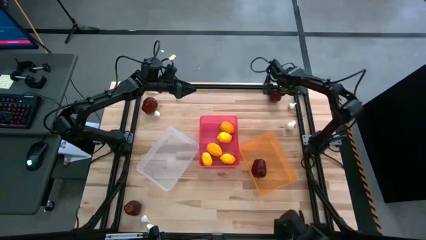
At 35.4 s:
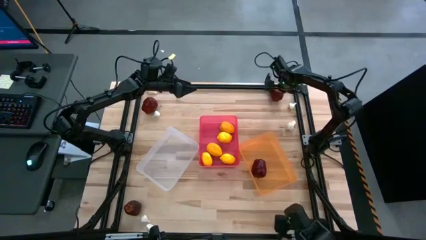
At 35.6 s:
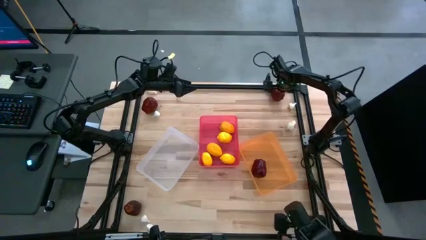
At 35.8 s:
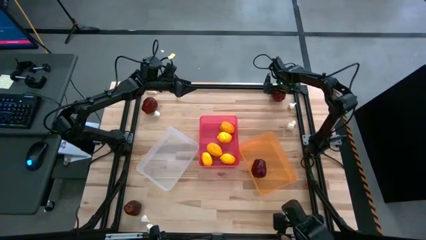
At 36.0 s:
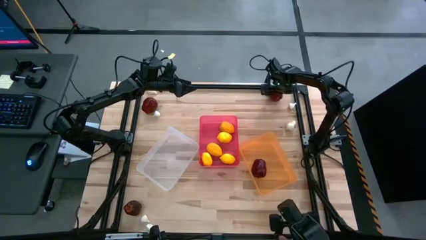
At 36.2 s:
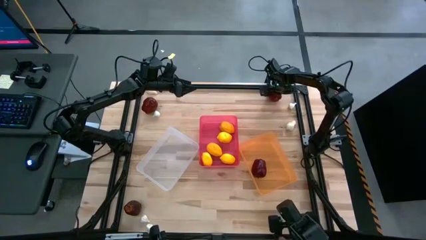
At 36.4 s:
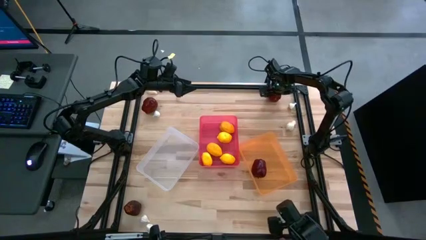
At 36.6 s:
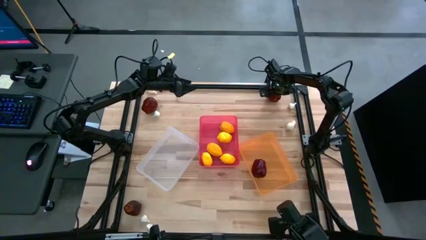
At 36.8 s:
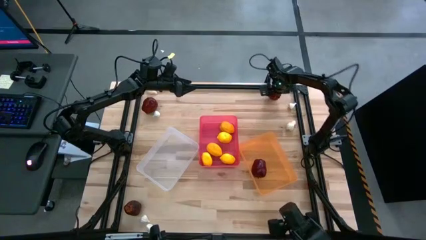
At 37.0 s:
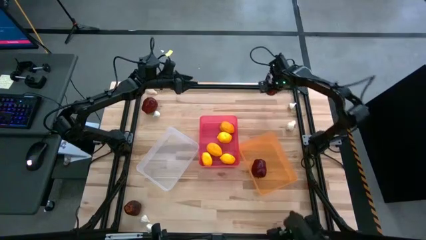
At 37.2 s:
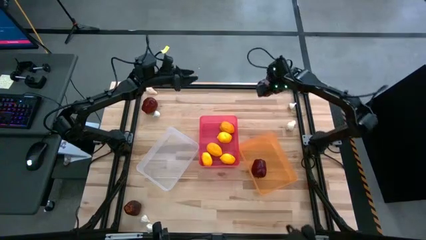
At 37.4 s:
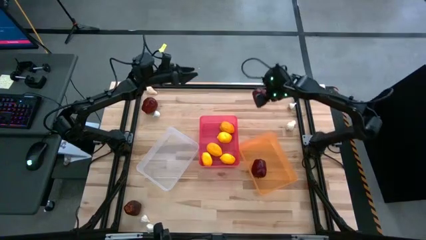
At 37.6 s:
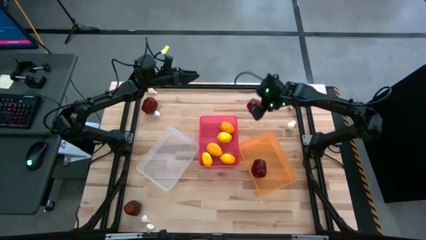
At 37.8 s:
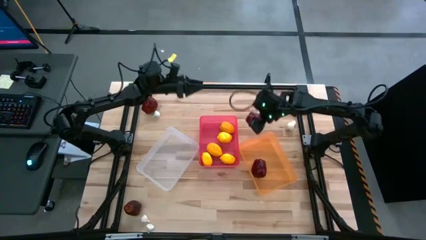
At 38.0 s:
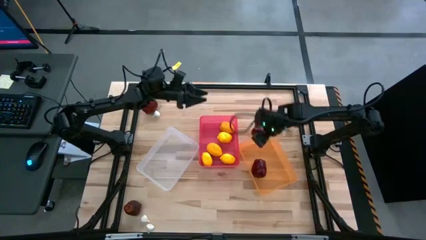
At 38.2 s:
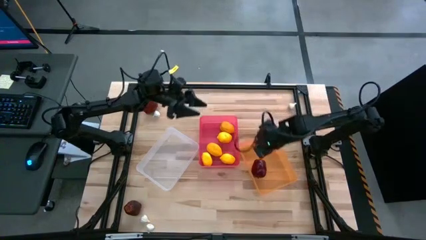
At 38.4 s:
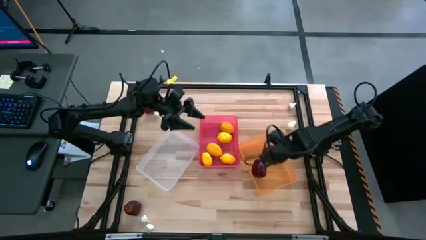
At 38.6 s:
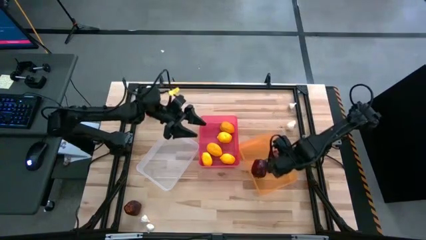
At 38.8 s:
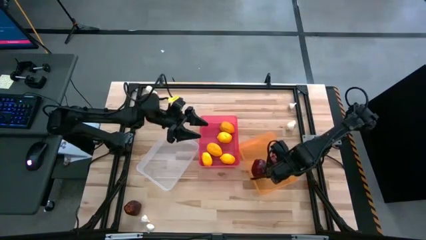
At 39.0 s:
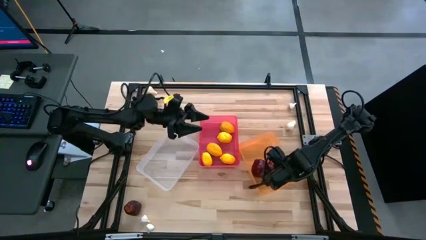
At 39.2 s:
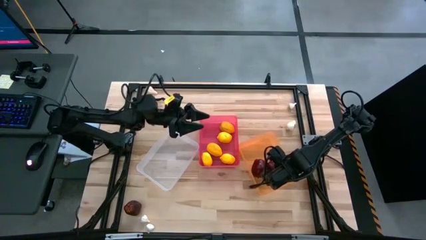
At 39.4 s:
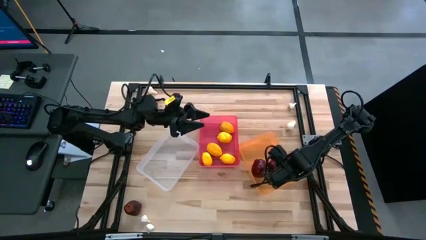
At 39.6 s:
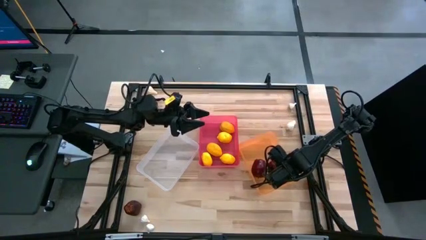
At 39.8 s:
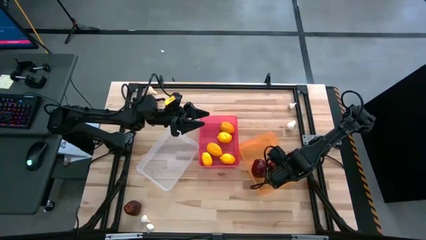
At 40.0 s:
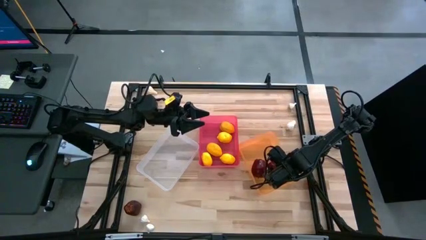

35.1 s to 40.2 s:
Task: Sort produce into baskets
Put the red apple into the orange bin

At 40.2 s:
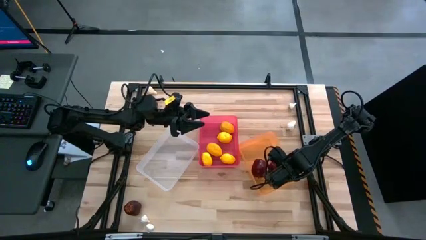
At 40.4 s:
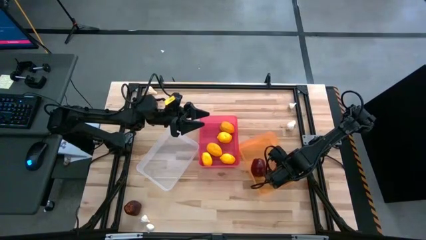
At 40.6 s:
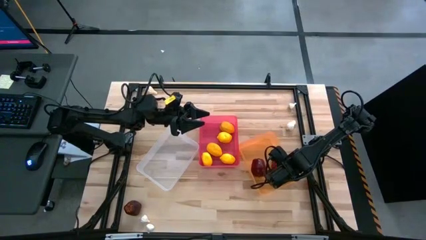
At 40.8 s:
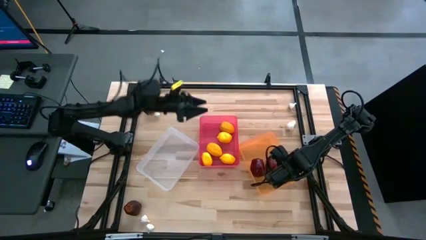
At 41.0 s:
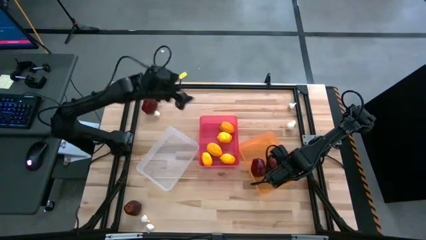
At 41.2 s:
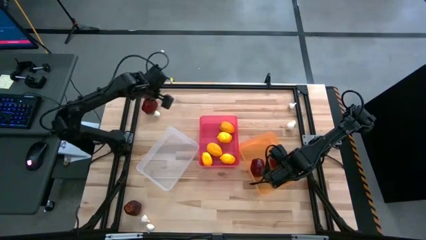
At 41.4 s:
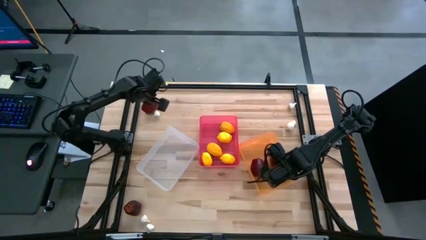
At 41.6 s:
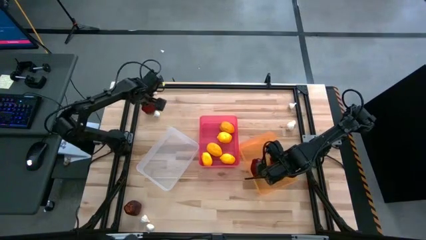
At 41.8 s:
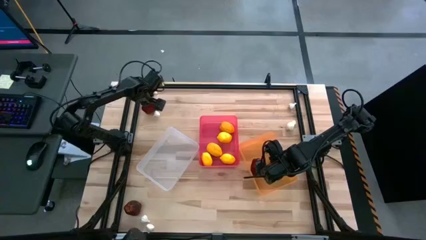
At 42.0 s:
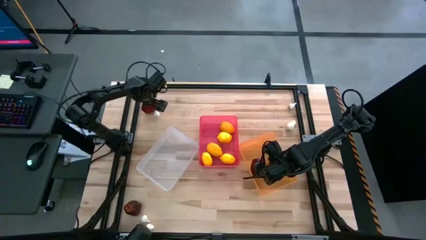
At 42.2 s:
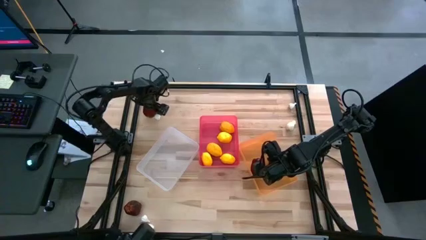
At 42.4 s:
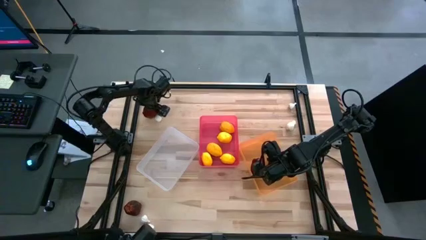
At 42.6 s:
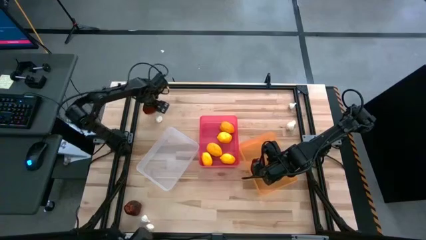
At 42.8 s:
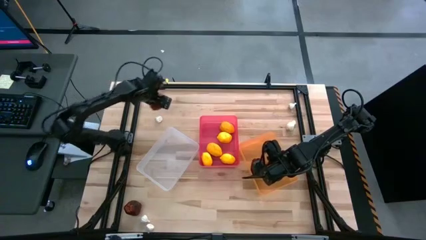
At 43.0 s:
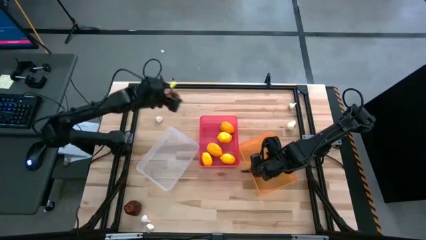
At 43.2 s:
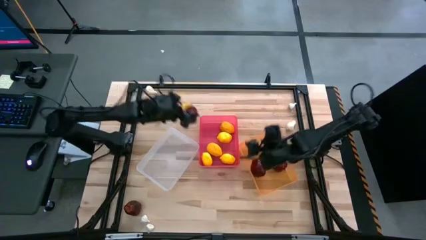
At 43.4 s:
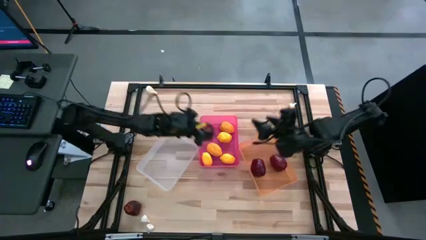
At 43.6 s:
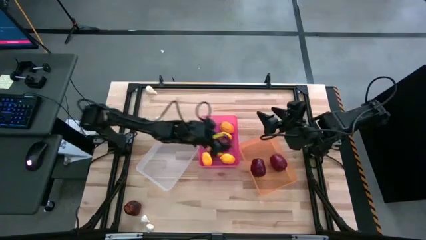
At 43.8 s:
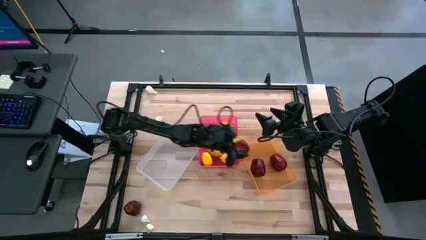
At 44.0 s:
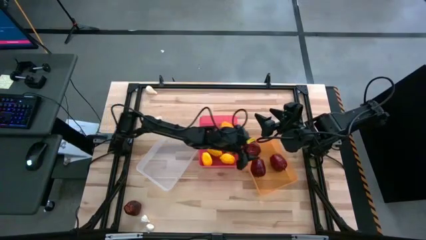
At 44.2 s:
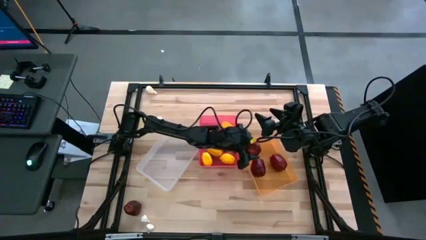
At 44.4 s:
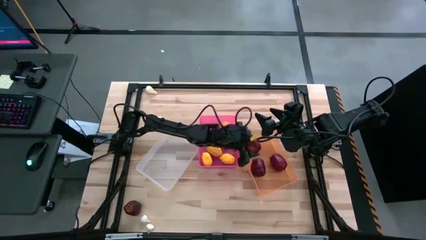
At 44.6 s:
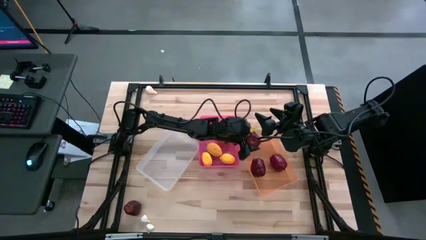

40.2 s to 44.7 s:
Put the red apple into the orange bin

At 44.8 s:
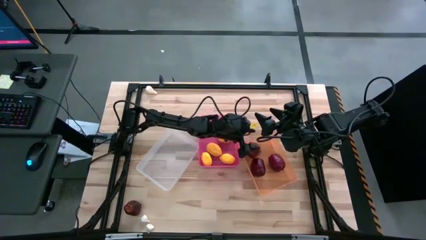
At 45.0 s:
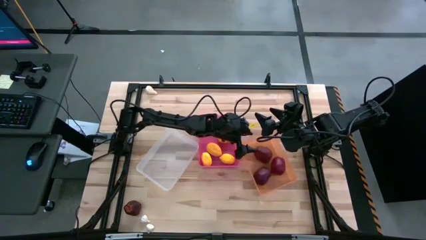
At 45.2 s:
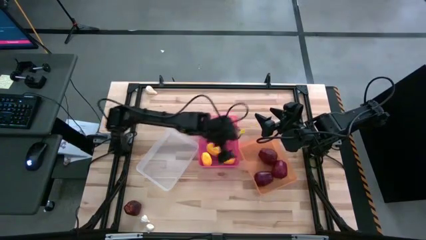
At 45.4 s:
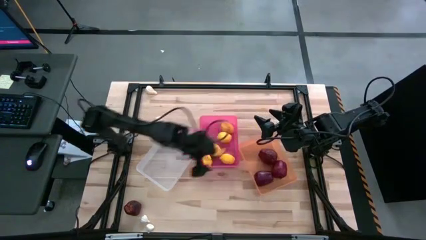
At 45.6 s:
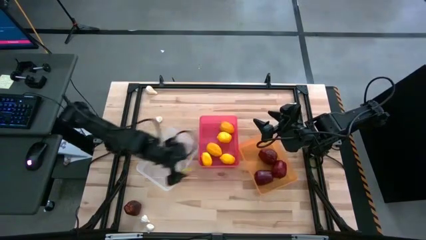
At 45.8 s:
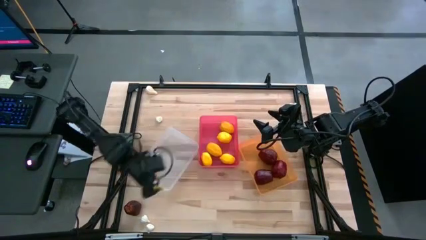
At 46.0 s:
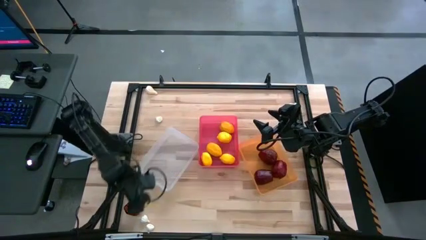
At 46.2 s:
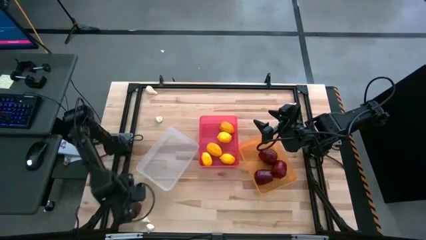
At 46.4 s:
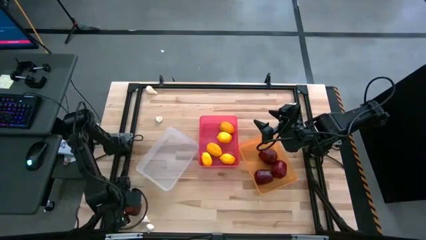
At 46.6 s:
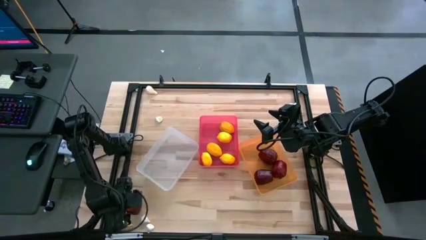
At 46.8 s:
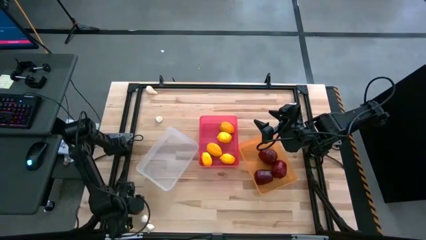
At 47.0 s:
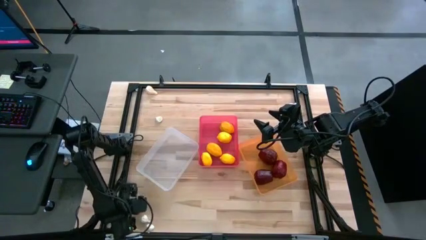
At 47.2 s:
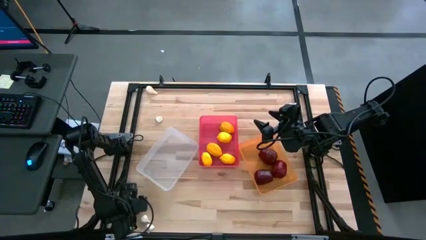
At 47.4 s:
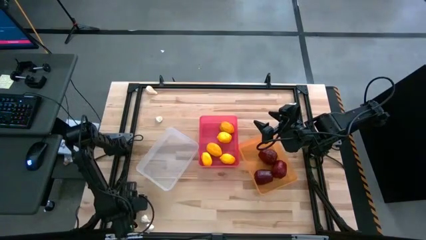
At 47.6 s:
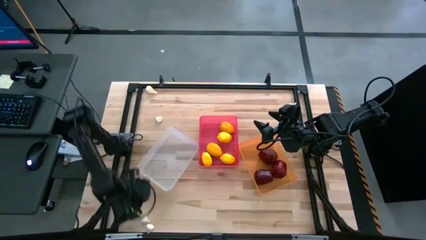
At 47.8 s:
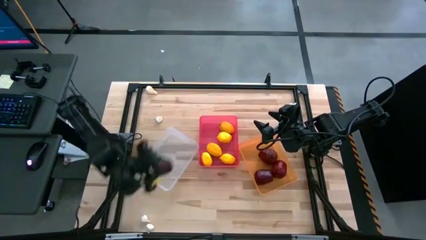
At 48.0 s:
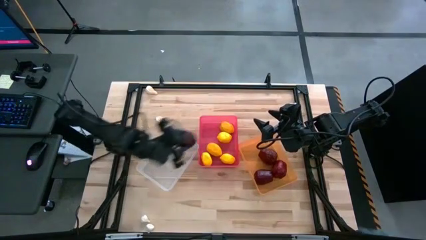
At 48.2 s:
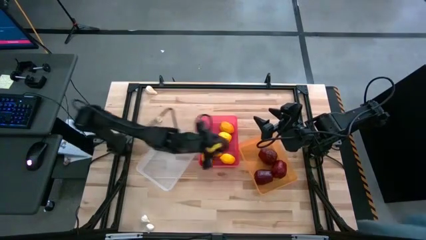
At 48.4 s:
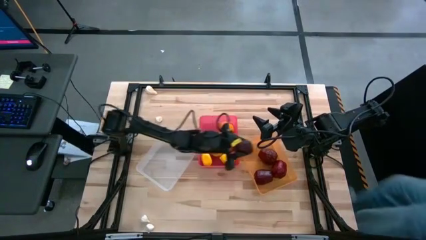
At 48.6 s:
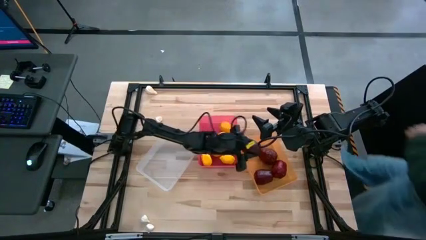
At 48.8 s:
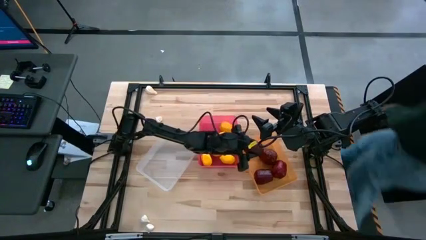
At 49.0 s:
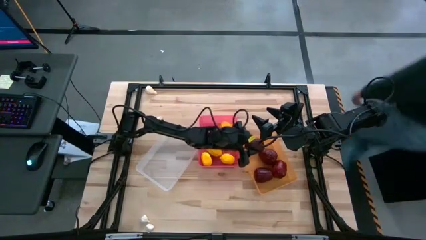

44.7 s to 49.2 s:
Put the red apple into the orange bin

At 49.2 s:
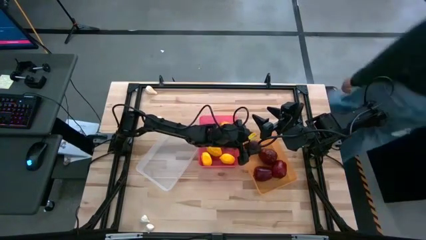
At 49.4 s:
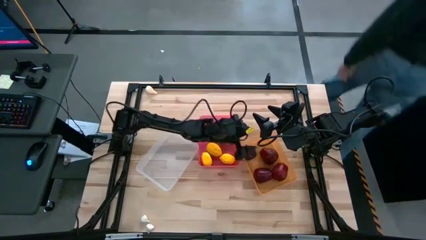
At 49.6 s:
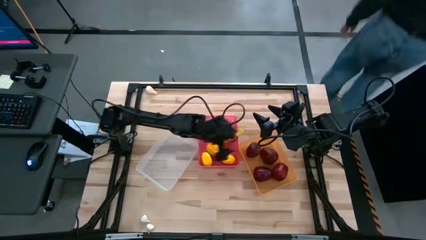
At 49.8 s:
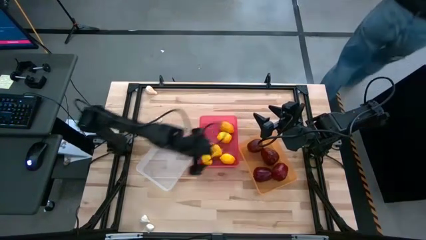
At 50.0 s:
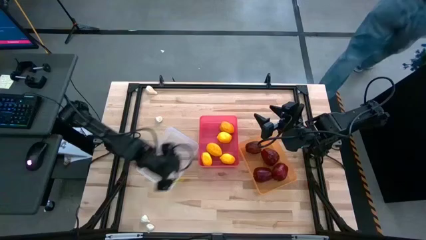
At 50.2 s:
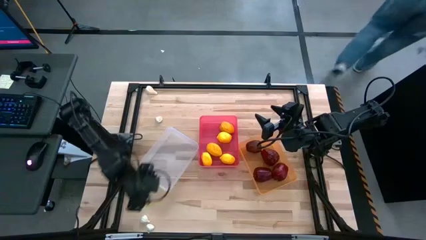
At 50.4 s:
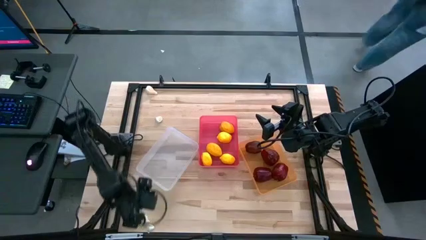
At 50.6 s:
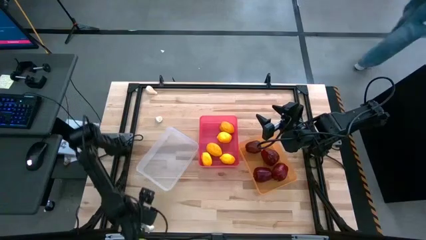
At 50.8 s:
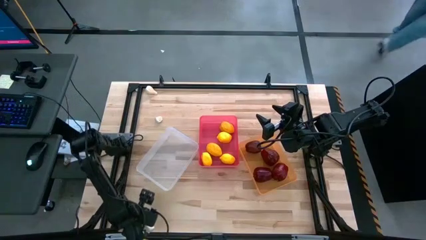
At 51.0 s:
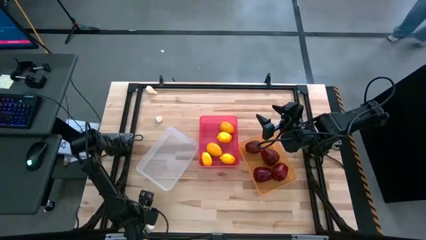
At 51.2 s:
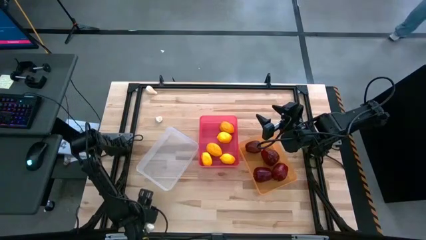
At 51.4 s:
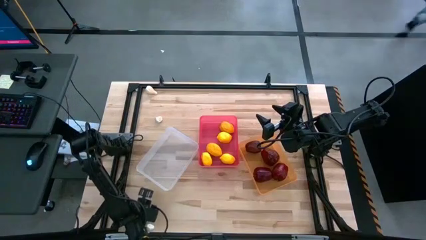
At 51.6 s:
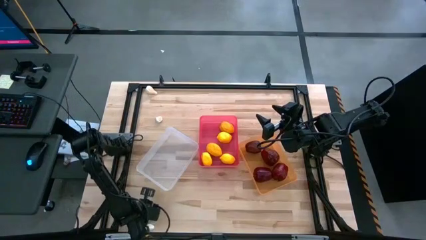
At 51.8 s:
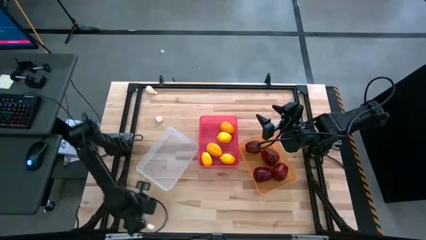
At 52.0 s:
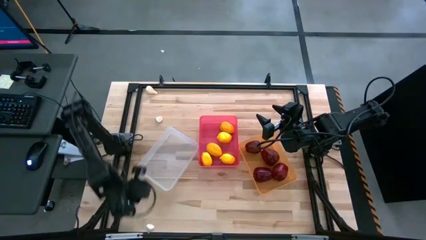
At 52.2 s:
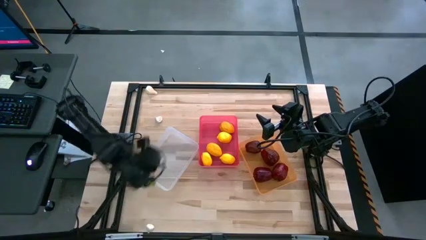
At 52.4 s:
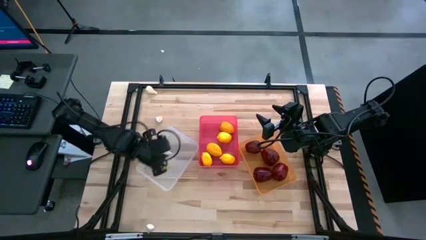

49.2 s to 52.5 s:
Put the white garlic into the transparent bin
